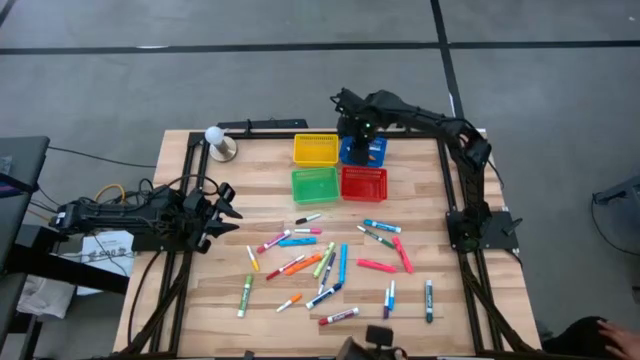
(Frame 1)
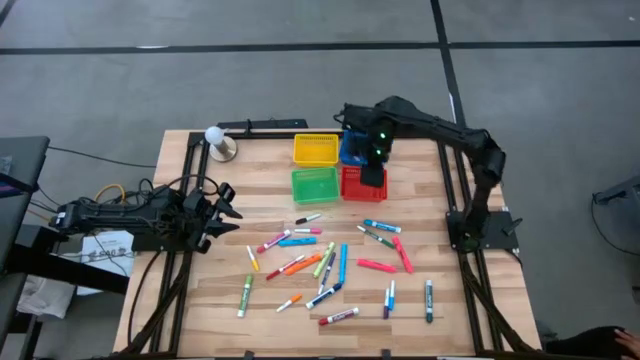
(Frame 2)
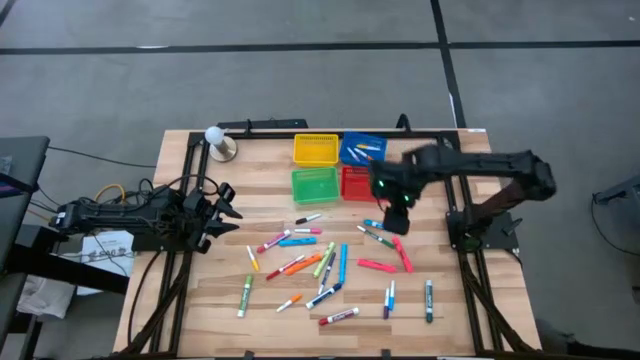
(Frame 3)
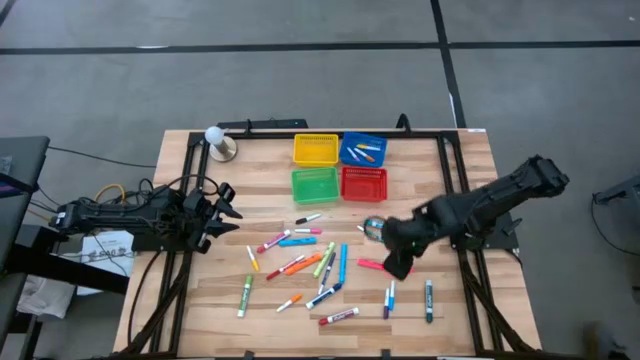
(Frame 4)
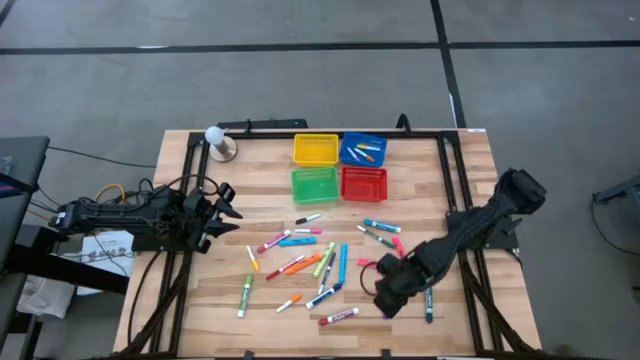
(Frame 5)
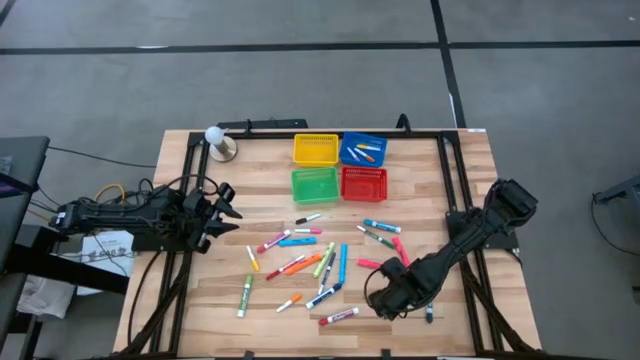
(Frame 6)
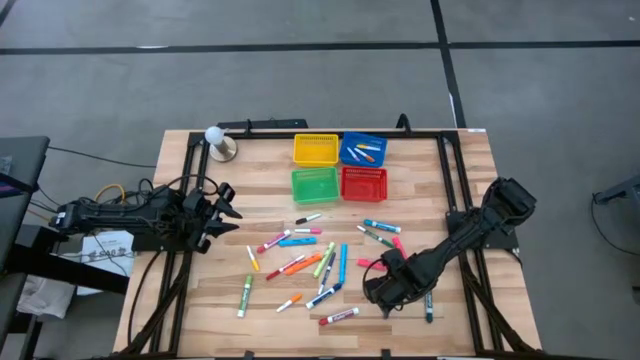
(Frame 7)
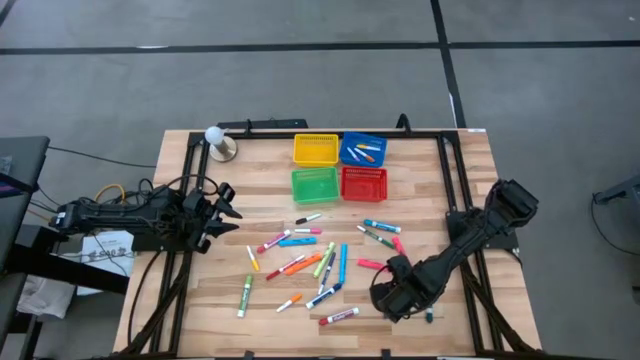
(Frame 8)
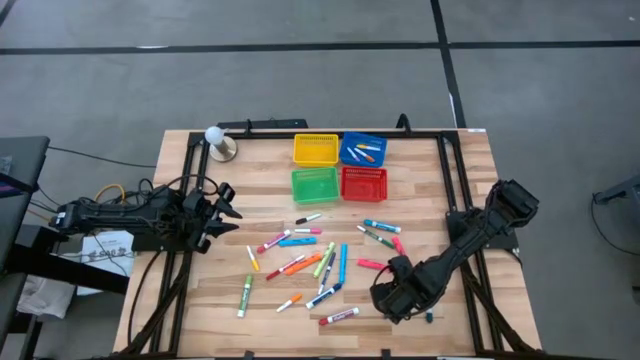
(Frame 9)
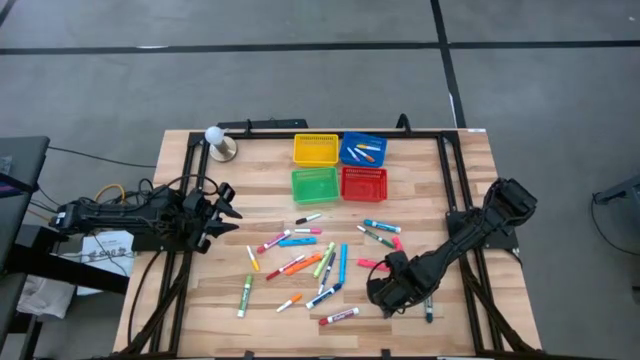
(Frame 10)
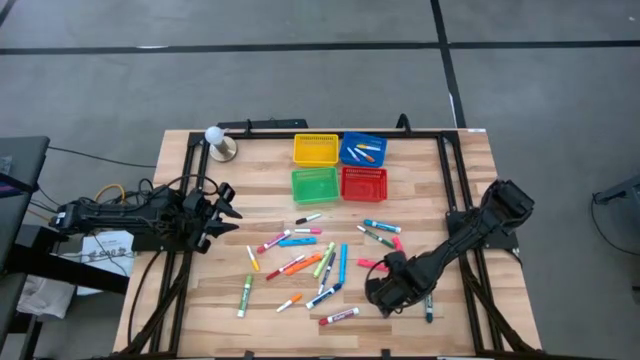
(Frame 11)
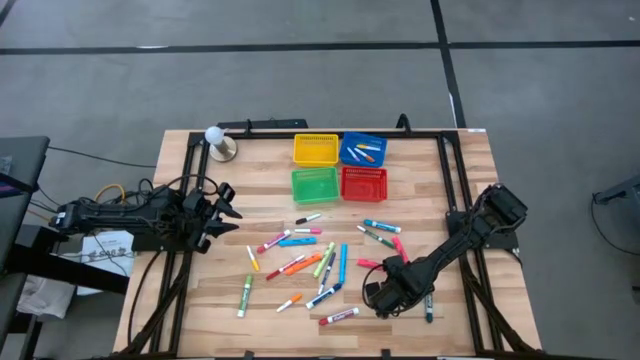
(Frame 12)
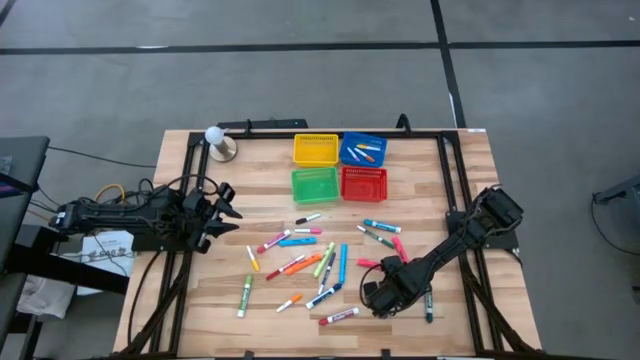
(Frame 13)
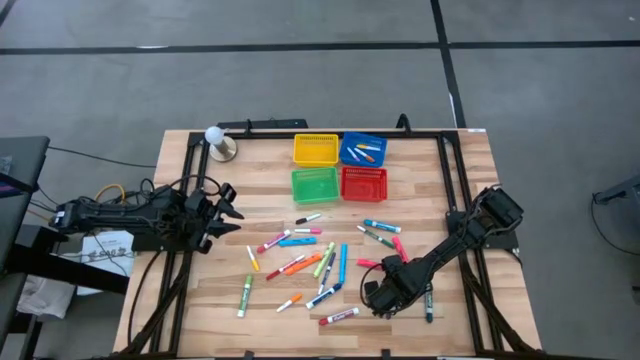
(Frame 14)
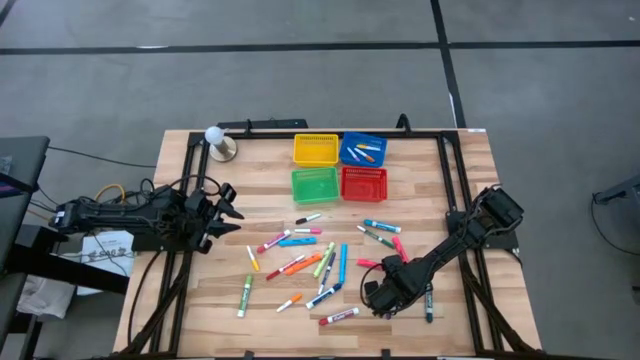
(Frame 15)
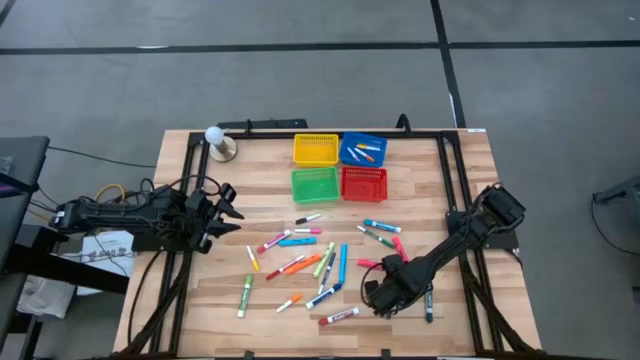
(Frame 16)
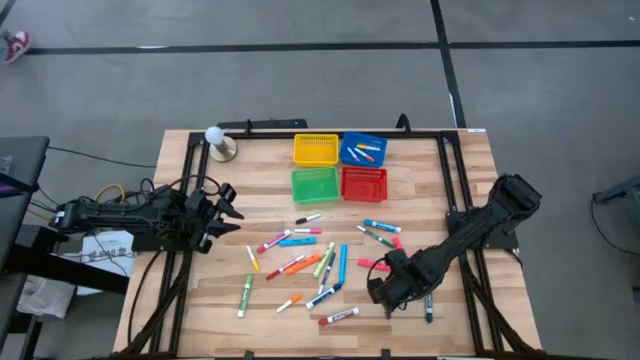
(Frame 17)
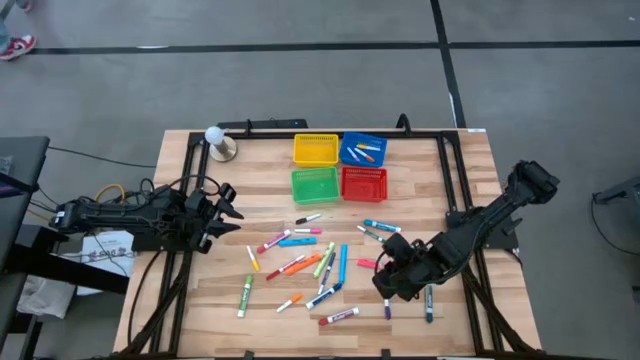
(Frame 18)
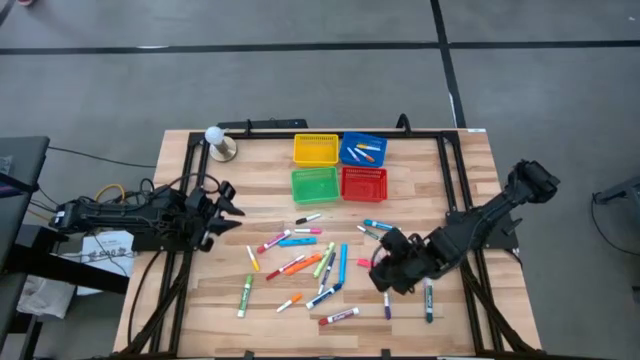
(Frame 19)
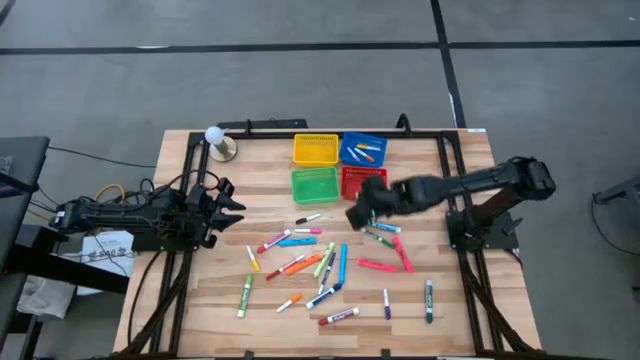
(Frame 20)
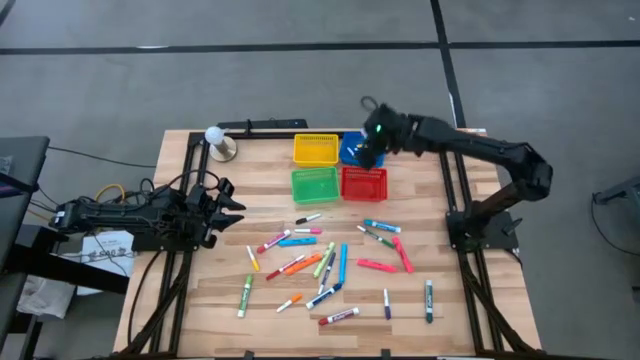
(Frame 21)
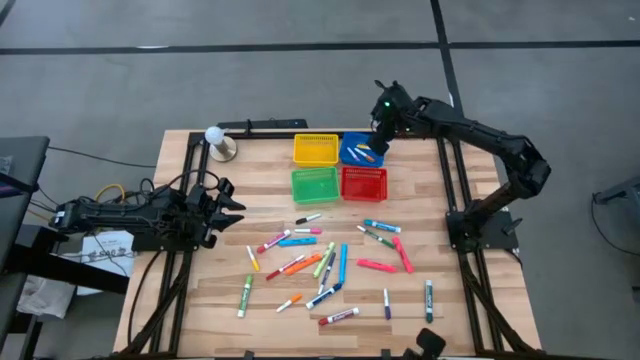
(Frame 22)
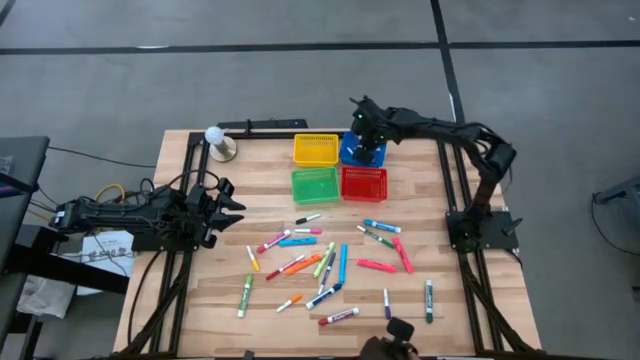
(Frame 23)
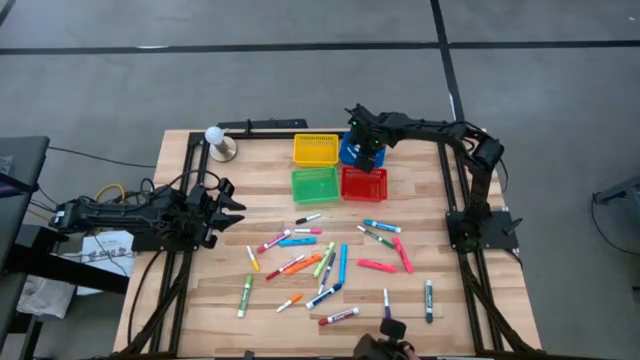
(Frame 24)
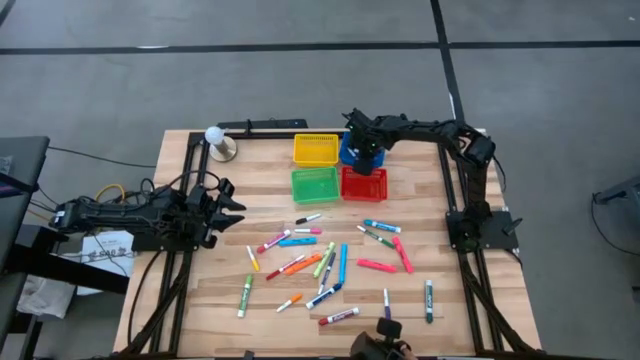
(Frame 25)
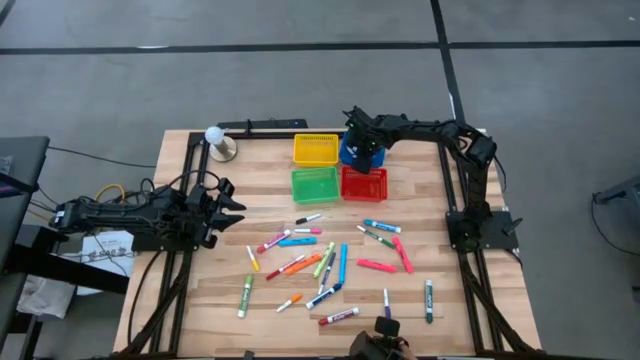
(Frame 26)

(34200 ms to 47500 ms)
Task: Pick & Place Markers
Put the light blue mini marker into the blue bin

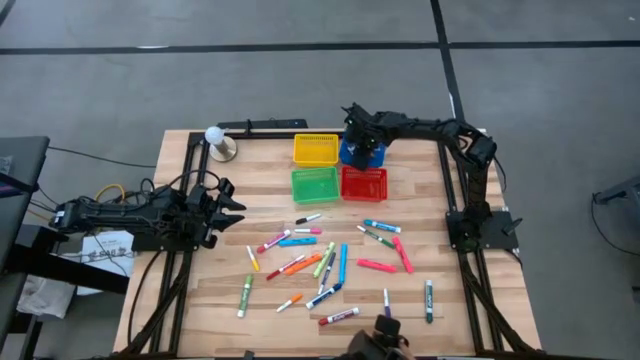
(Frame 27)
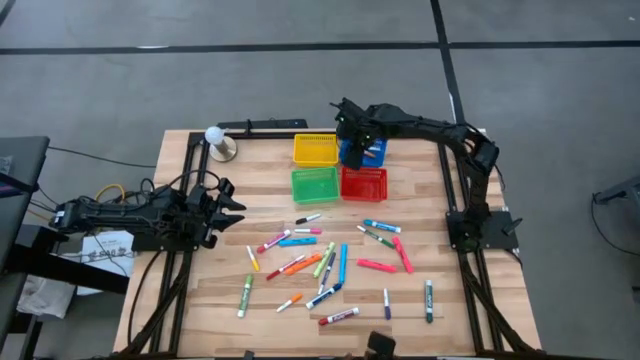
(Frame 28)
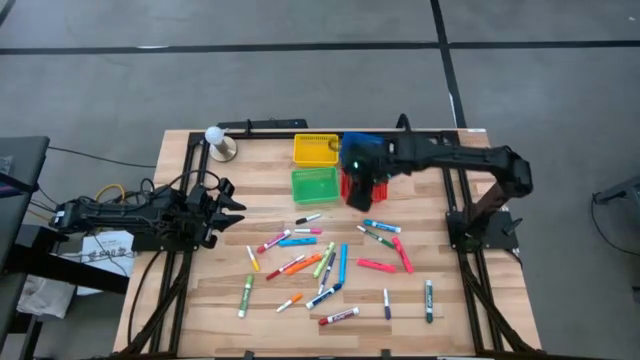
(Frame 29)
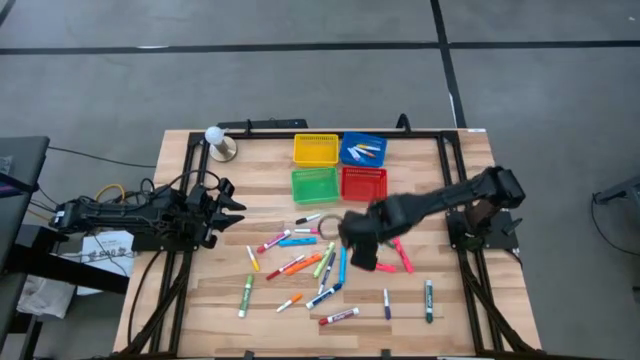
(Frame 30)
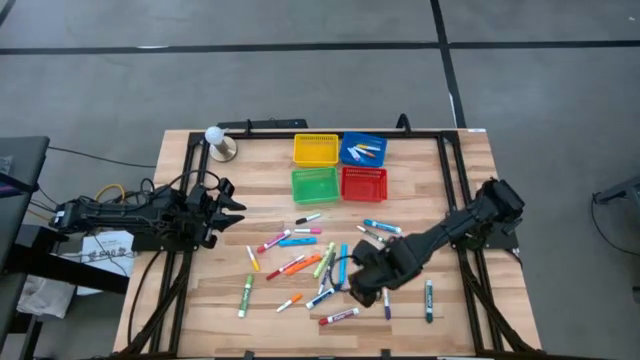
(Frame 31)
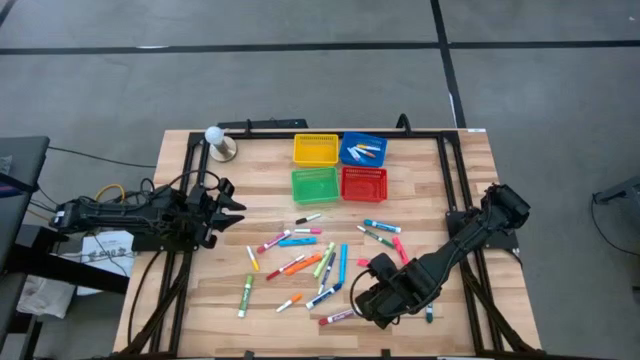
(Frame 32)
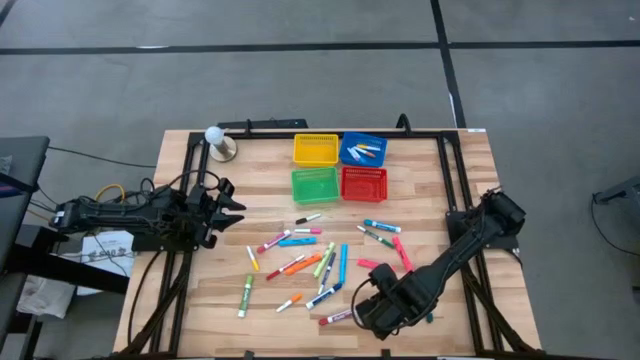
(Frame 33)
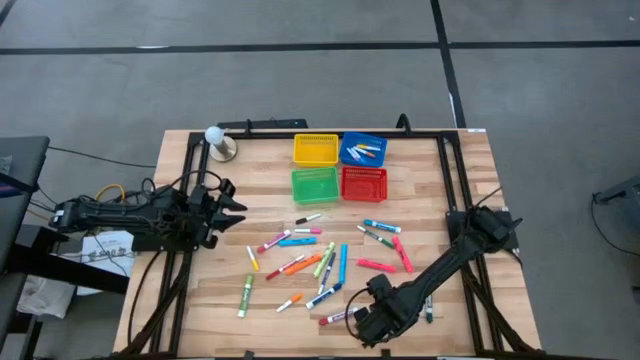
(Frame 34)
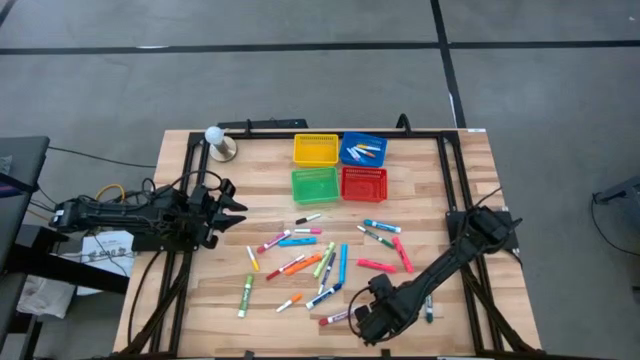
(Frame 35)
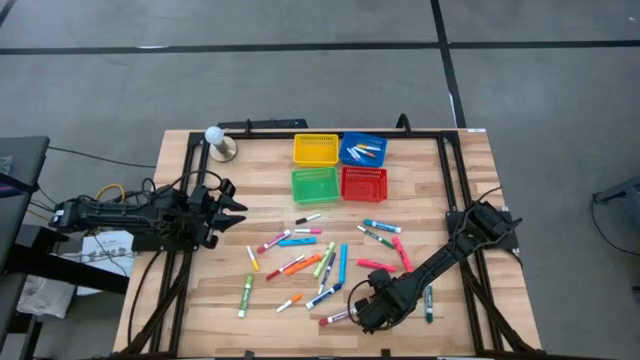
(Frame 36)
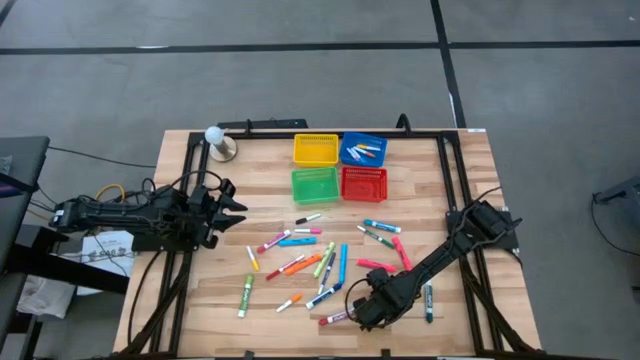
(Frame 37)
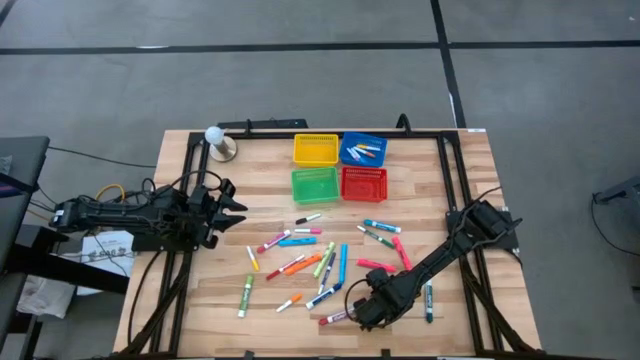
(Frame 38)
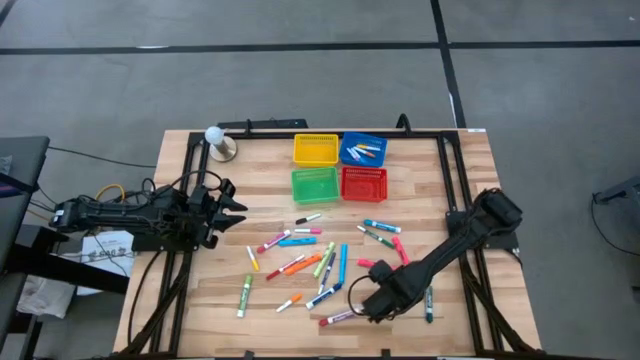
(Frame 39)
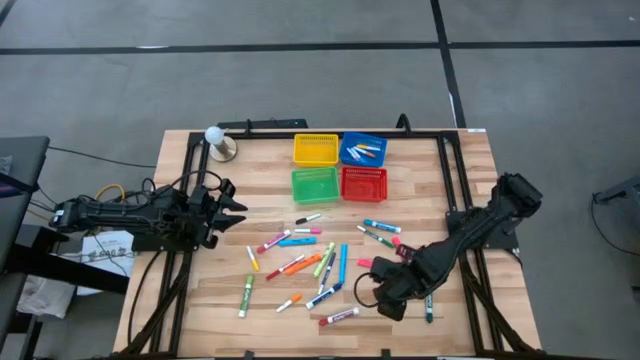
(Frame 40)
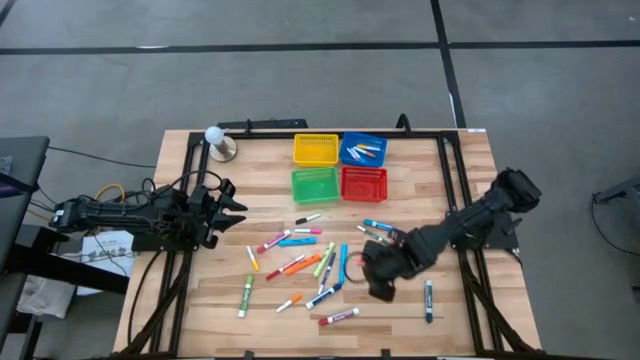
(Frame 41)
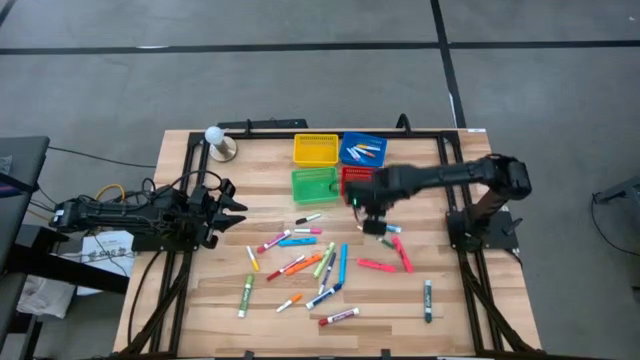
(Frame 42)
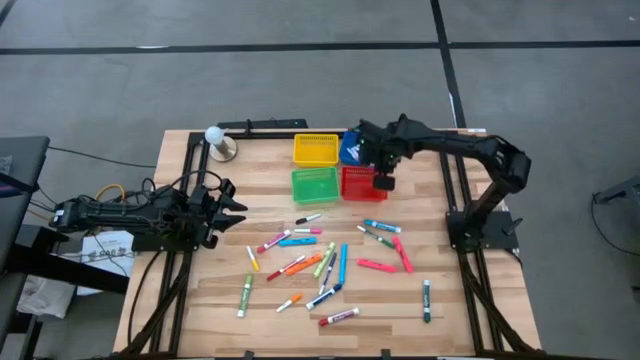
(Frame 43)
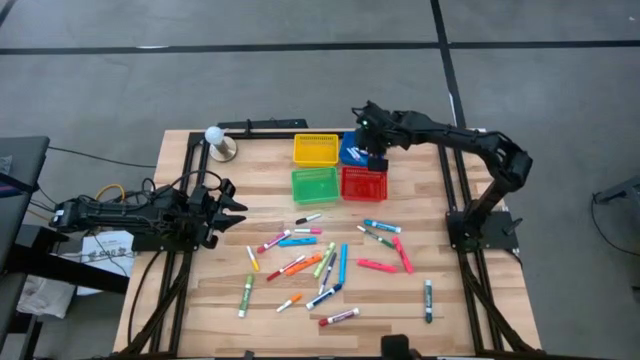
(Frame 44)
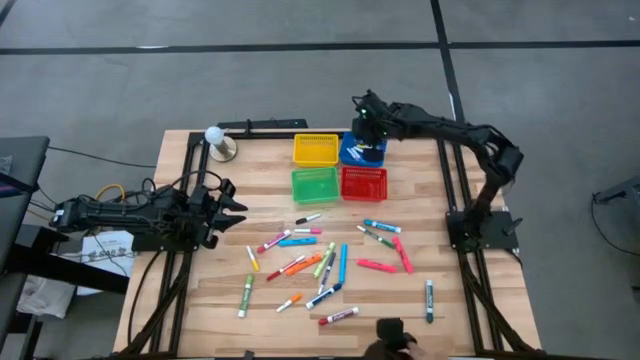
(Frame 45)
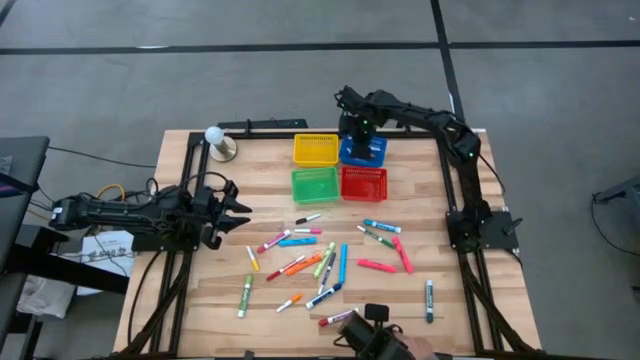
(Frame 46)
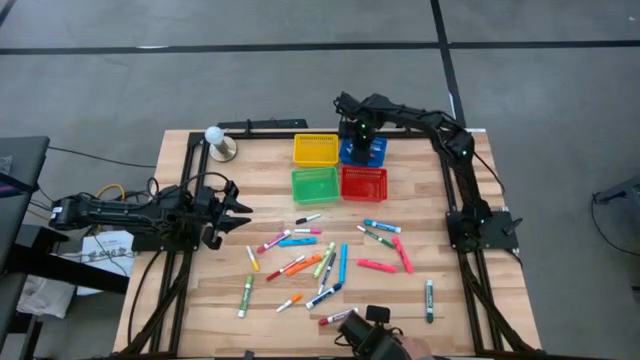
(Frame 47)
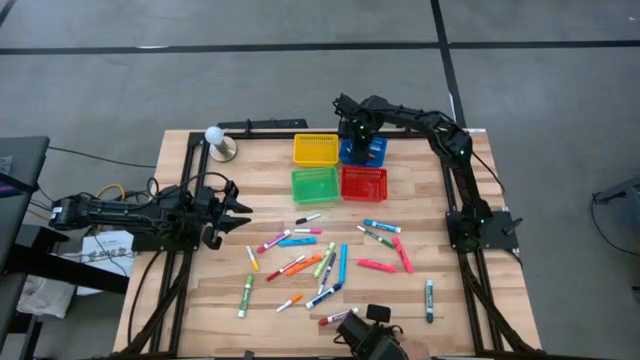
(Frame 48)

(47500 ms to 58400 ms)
Put the violet mini marker into the blue bin
